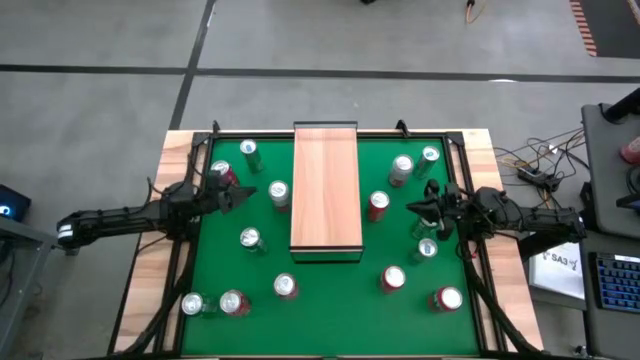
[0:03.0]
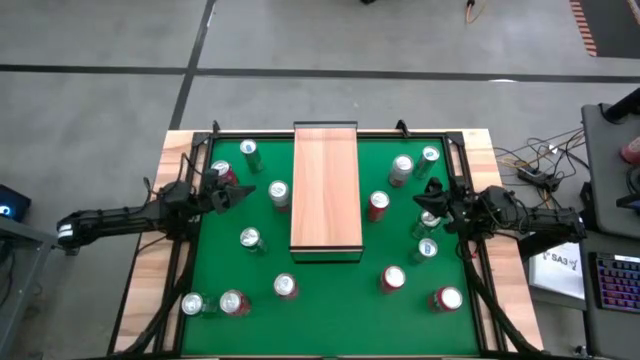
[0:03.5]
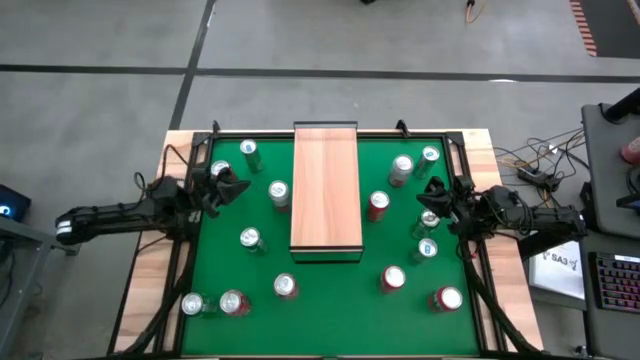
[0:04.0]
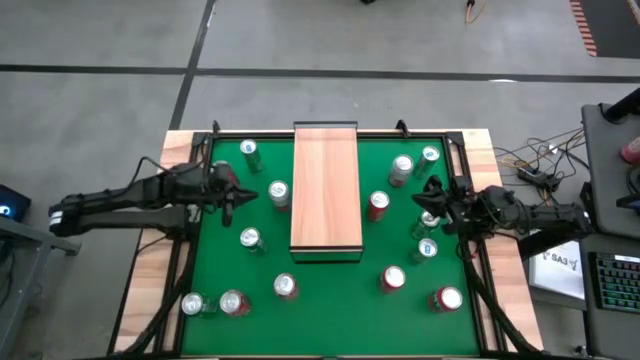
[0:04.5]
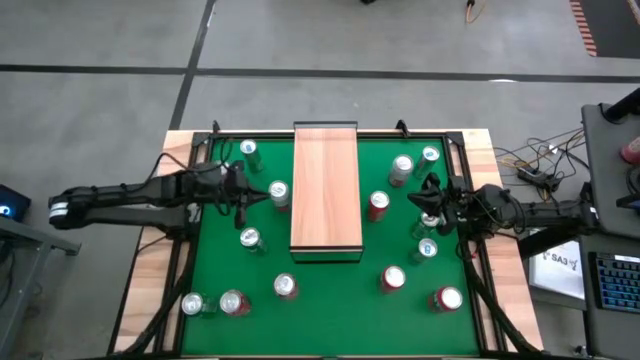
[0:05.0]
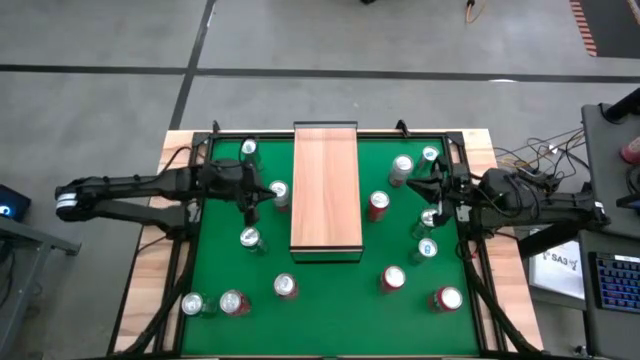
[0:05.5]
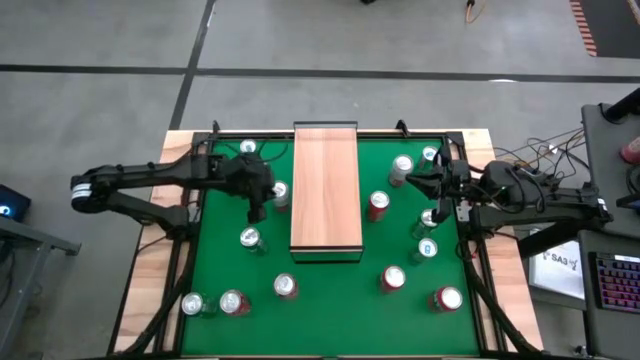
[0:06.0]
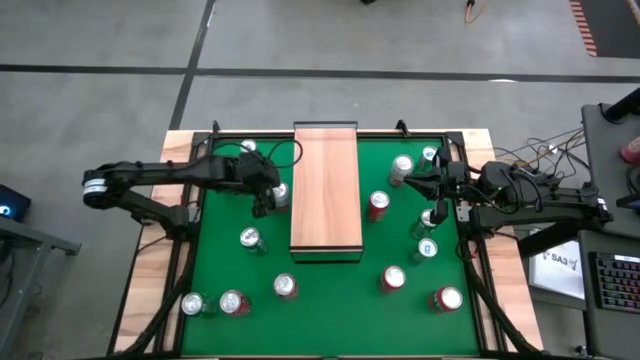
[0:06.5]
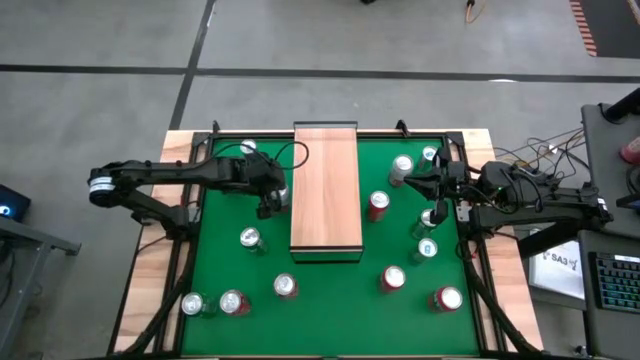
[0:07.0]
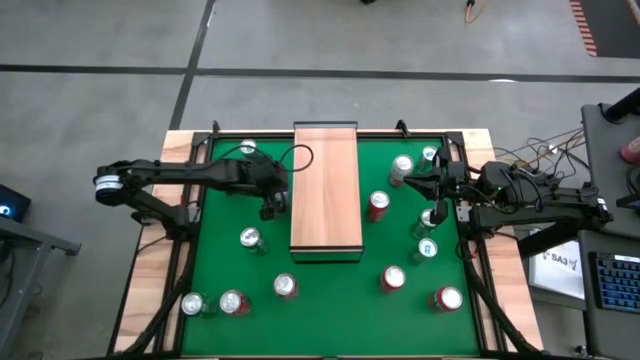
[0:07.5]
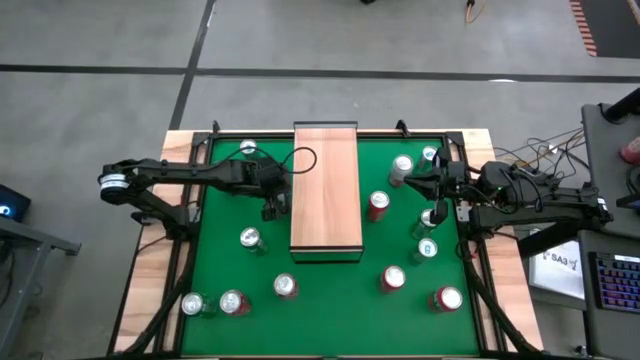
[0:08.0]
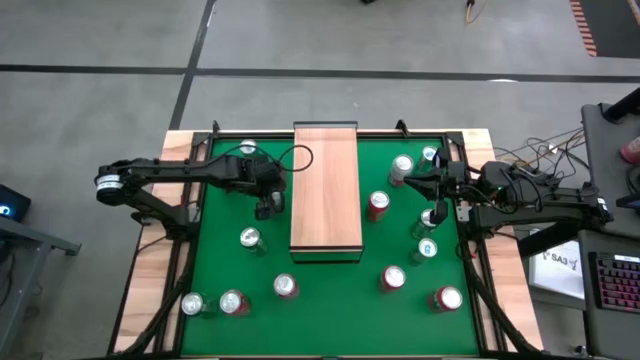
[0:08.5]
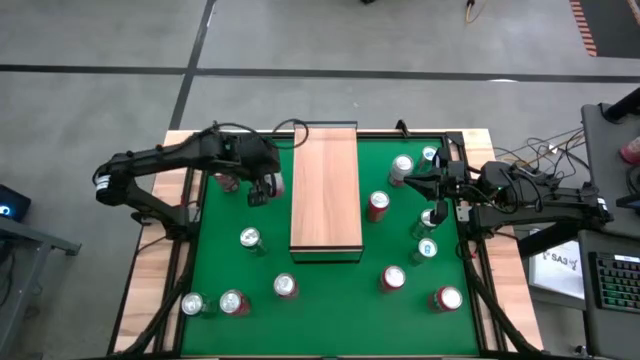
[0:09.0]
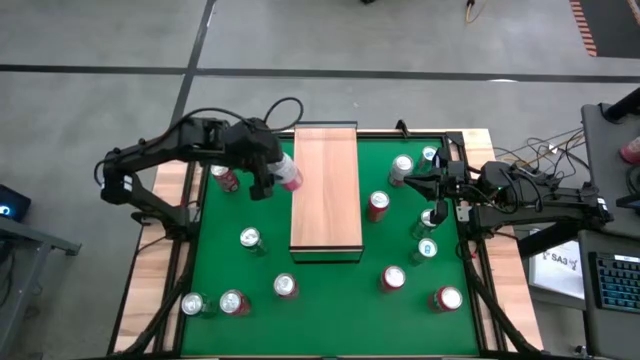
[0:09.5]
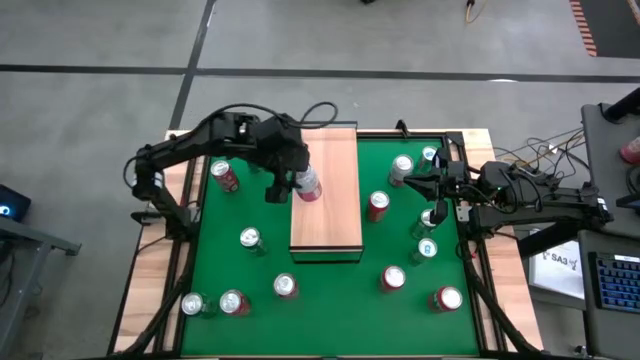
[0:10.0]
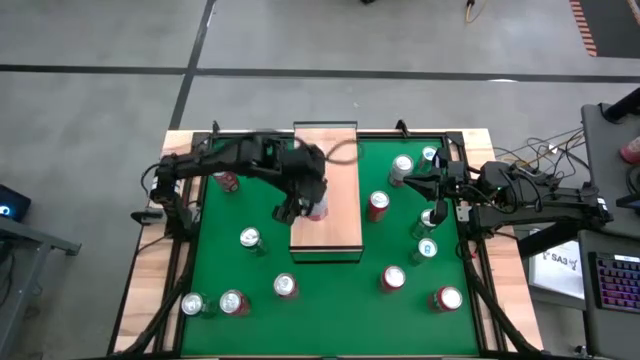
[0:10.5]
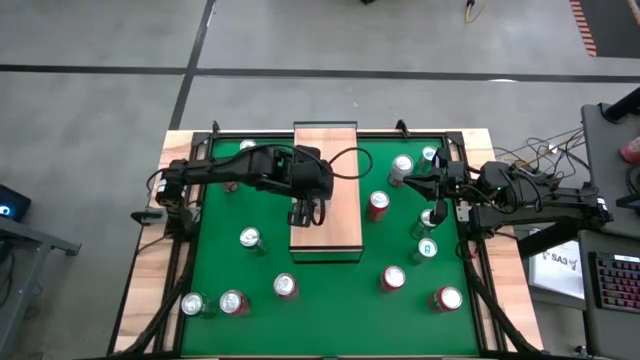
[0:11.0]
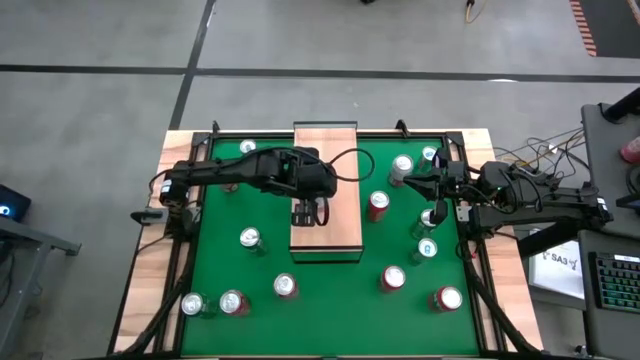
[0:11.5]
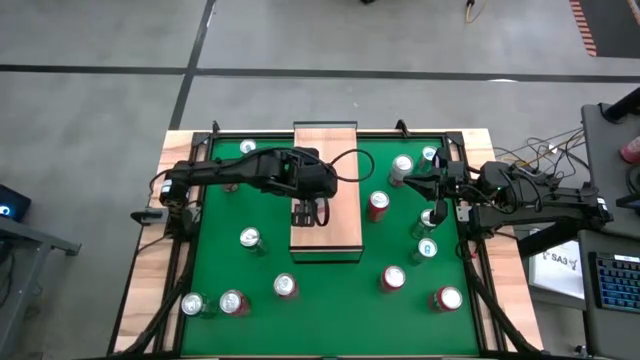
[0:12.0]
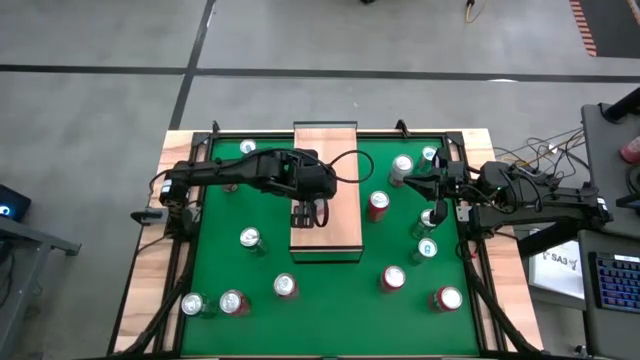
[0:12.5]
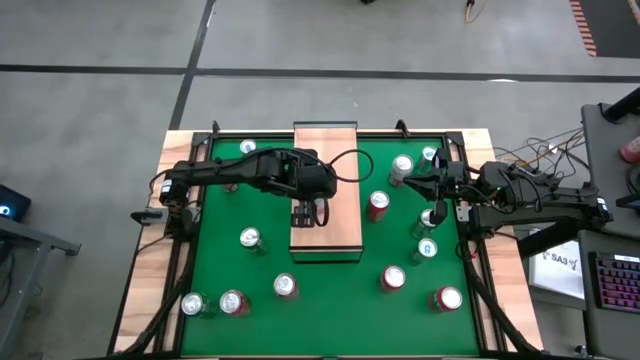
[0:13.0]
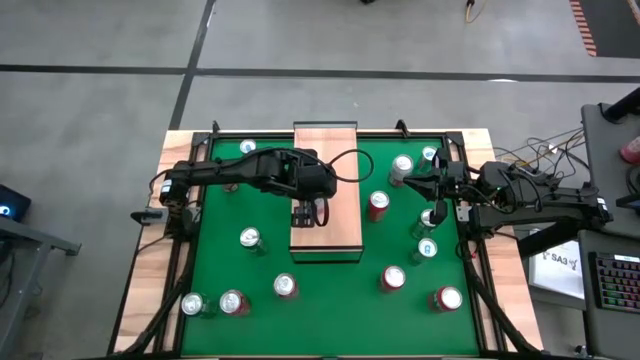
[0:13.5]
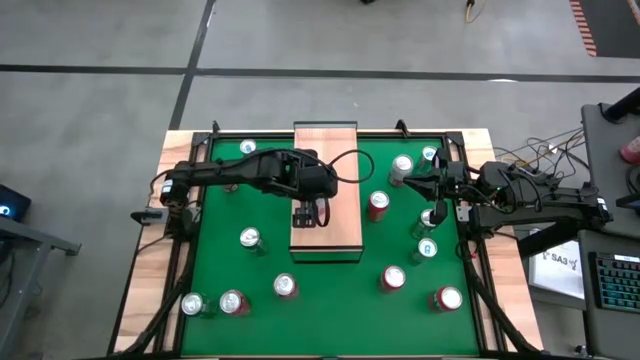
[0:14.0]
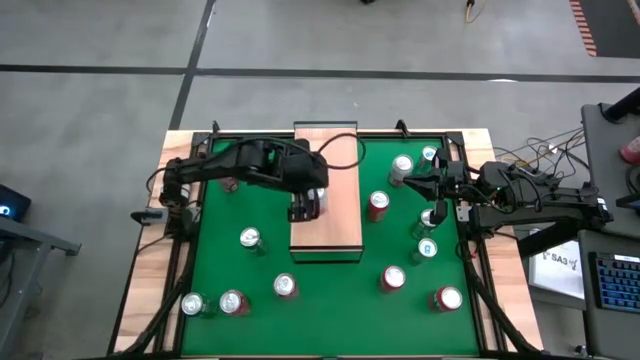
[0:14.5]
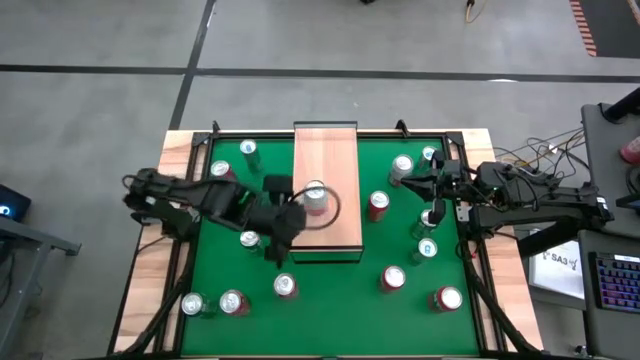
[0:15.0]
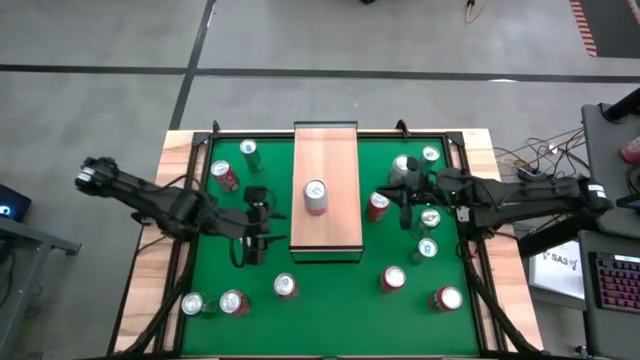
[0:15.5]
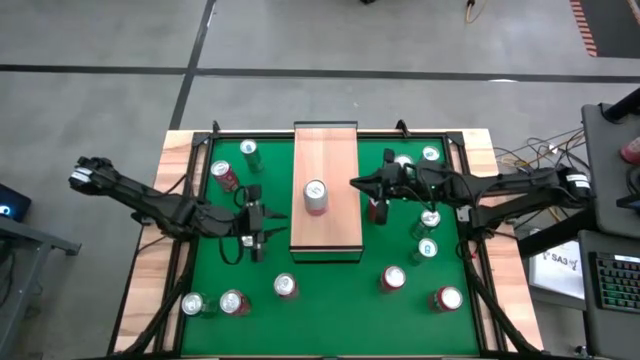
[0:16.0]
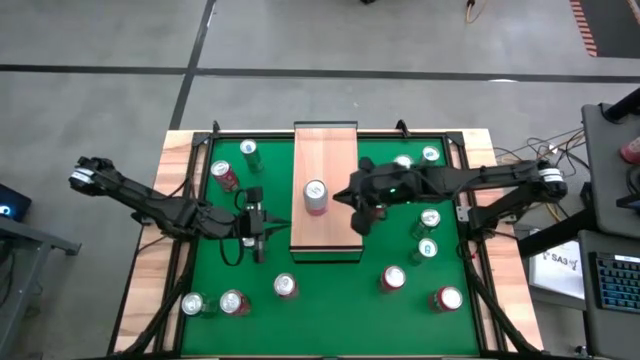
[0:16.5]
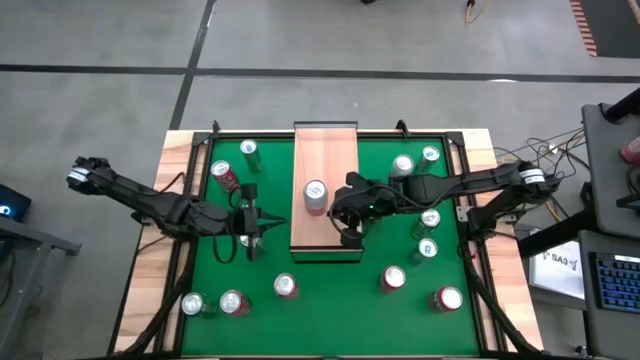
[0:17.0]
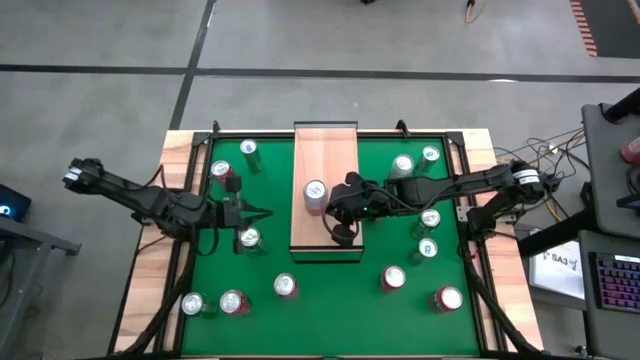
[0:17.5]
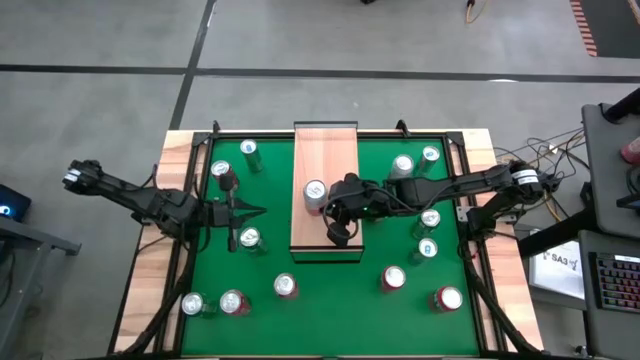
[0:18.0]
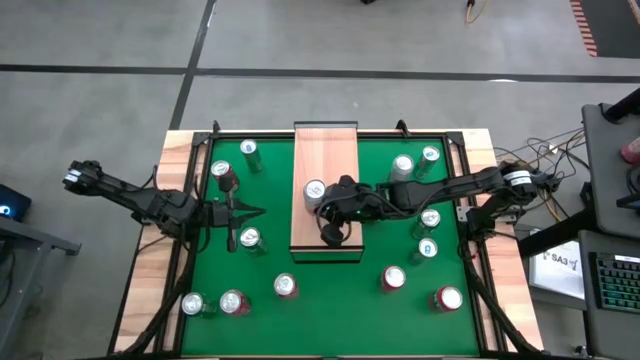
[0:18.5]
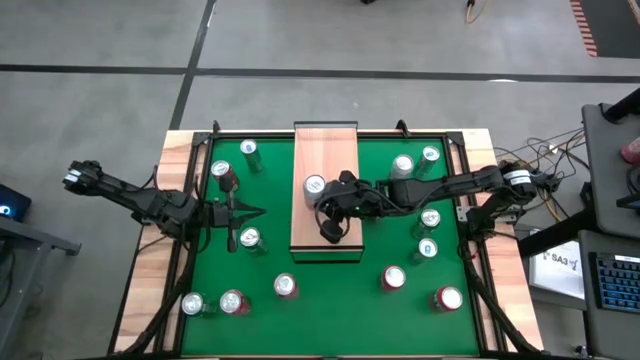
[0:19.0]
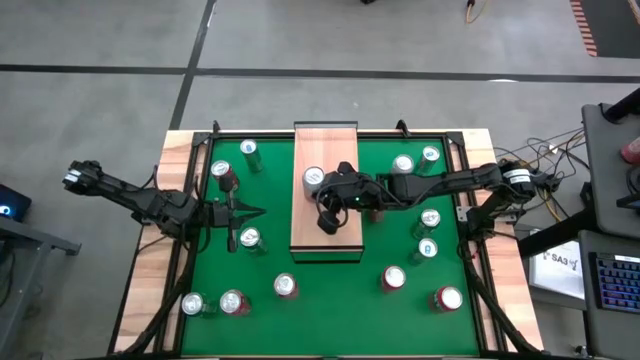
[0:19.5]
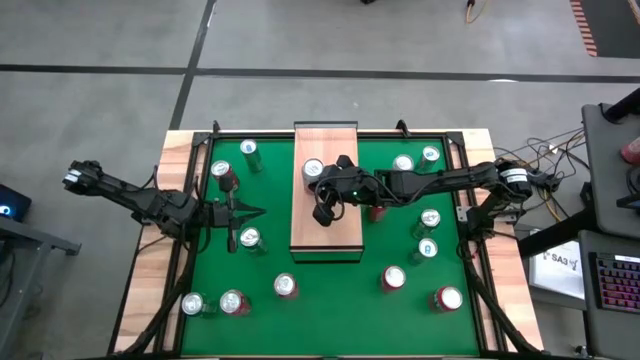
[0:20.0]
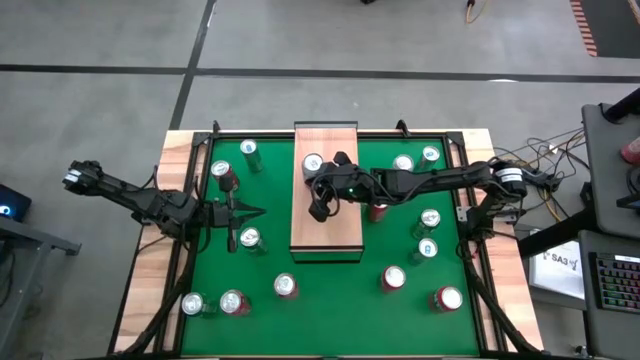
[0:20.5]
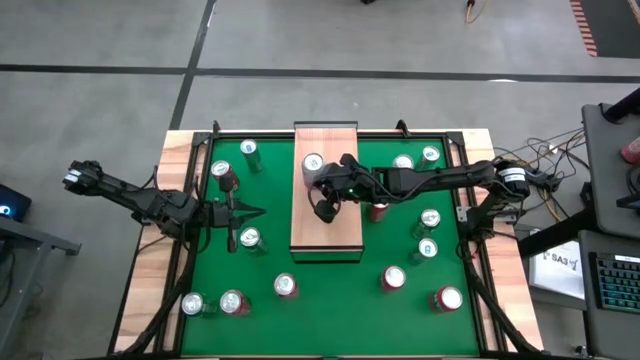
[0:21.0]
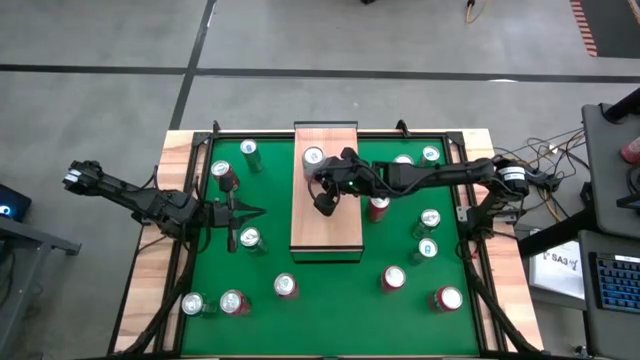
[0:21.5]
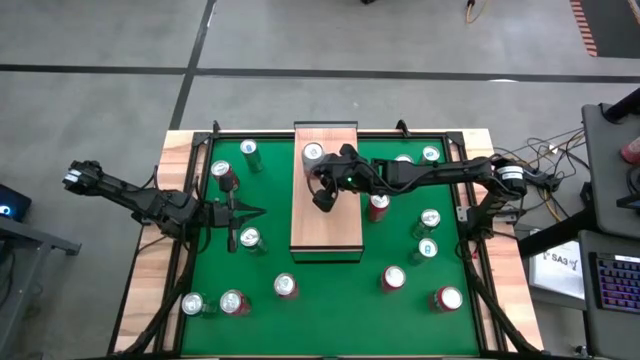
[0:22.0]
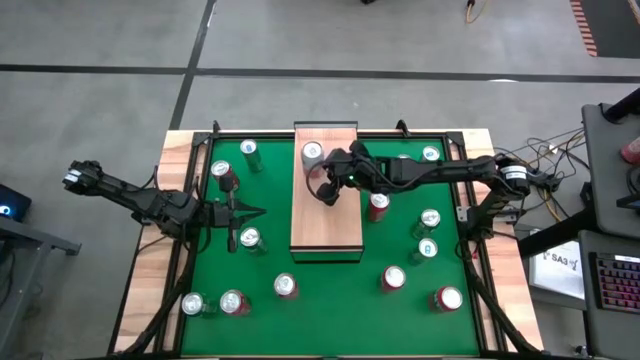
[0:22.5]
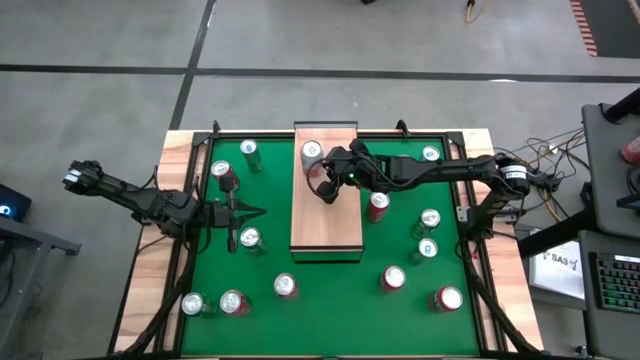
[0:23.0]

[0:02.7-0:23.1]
Task: Place canned beverage on shelf
Put the white can on the shelf
